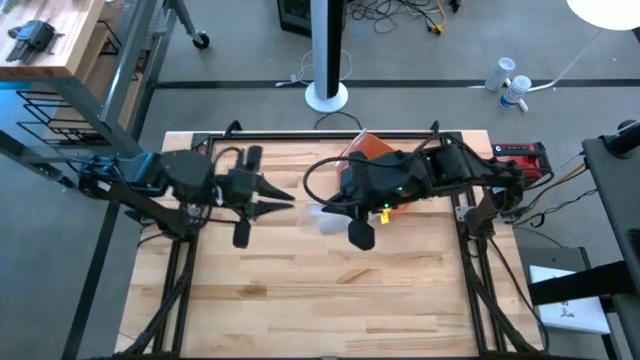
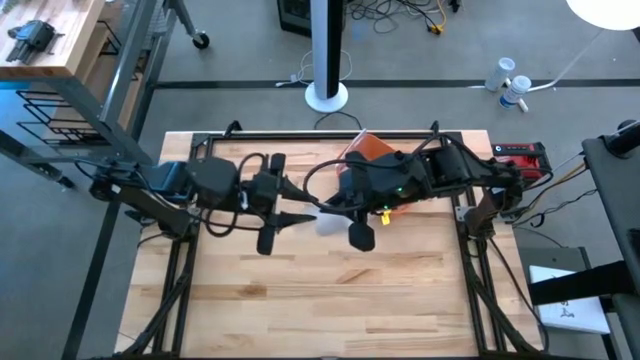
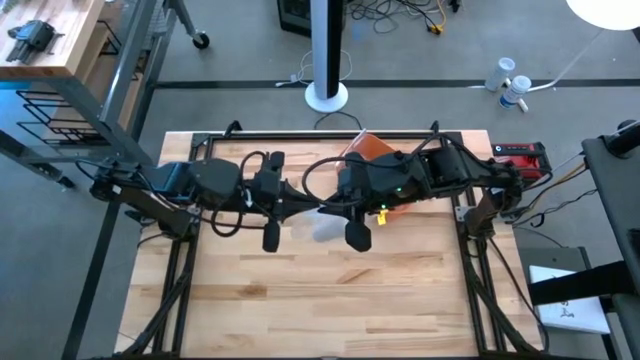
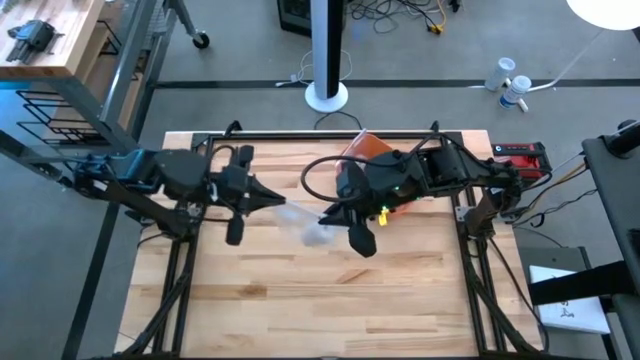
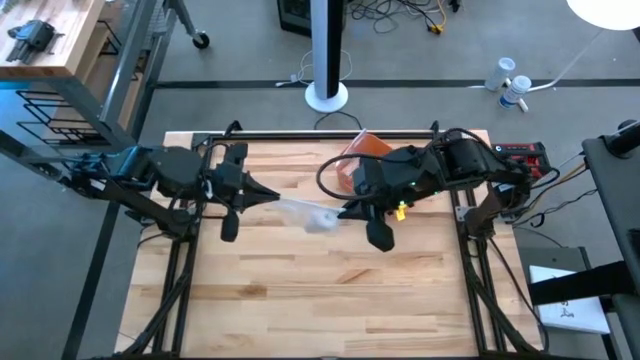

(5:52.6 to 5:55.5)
Task: Roll bandage
Close the transparent zip bag

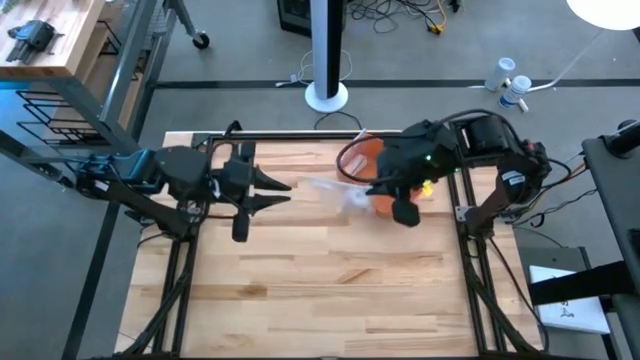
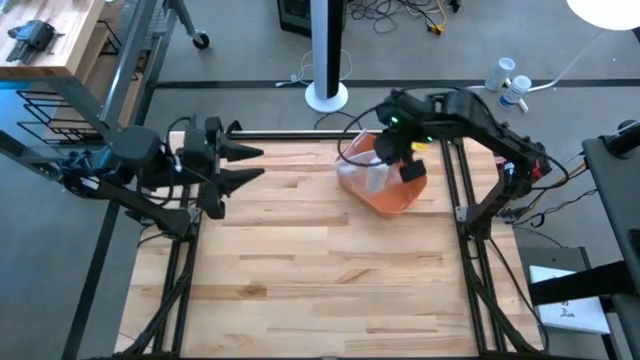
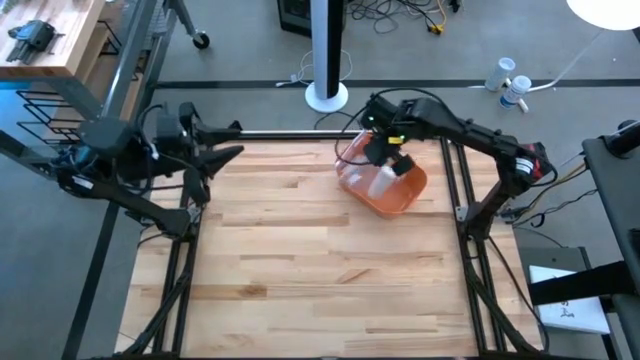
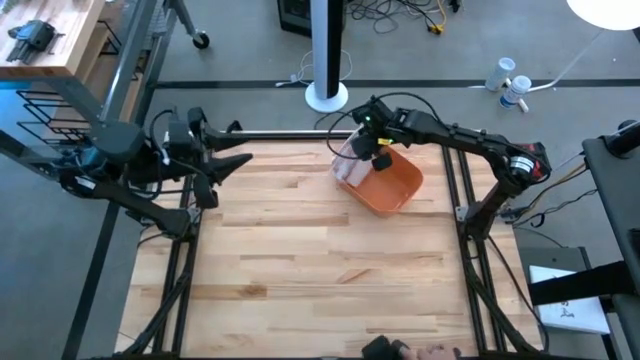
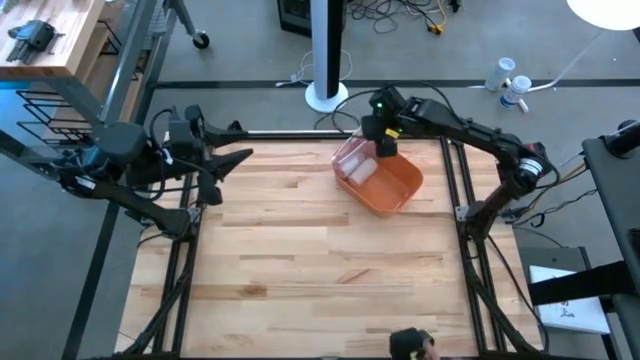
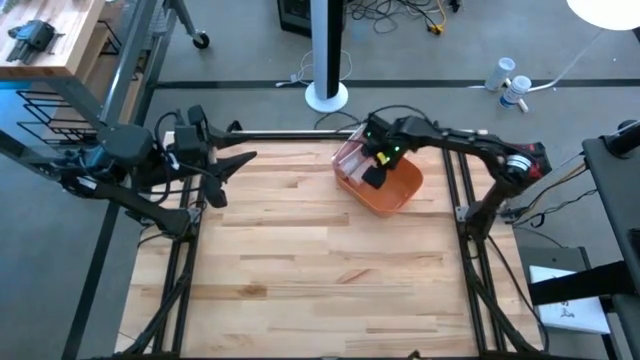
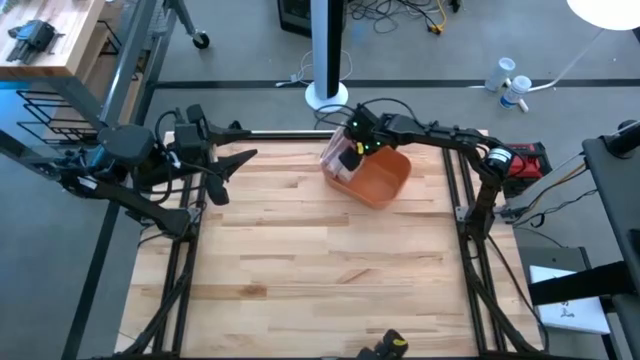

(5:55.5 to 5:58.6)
Put the transparent zip bag into the orange bin

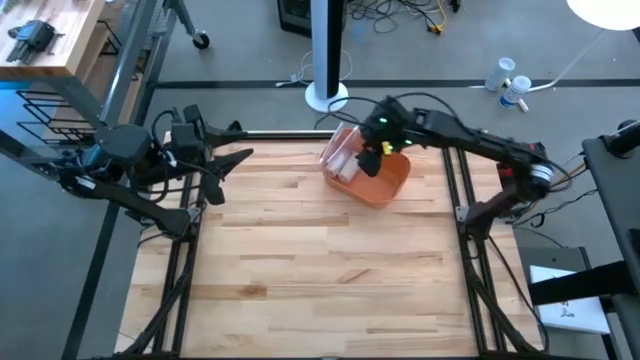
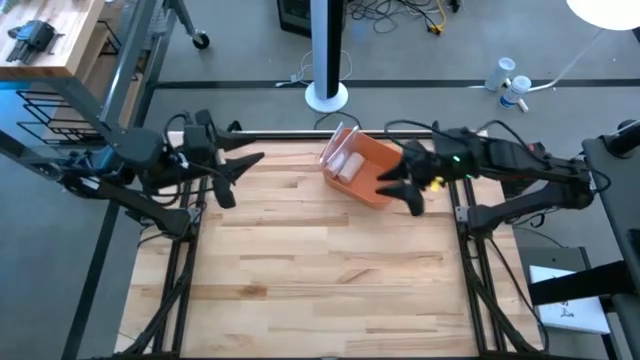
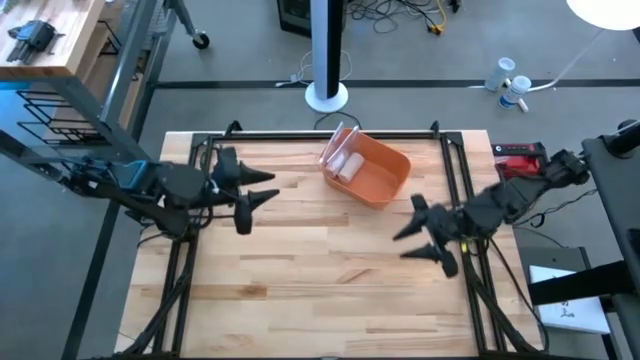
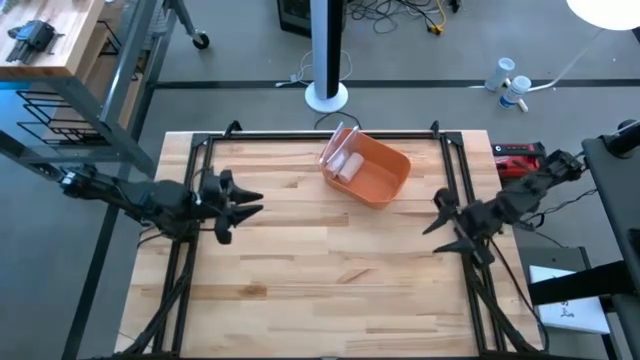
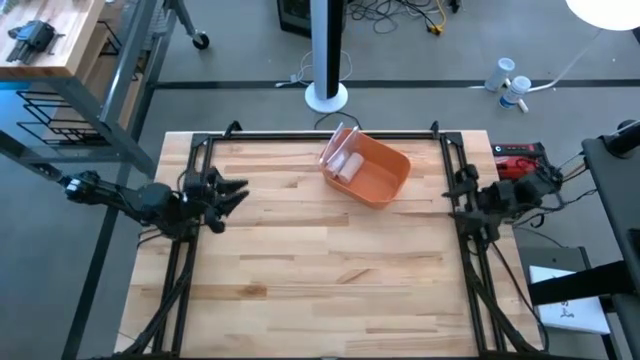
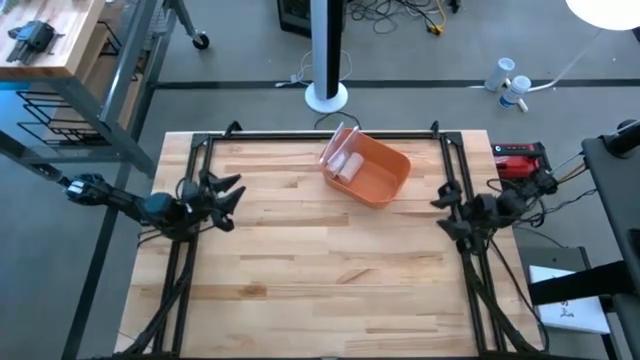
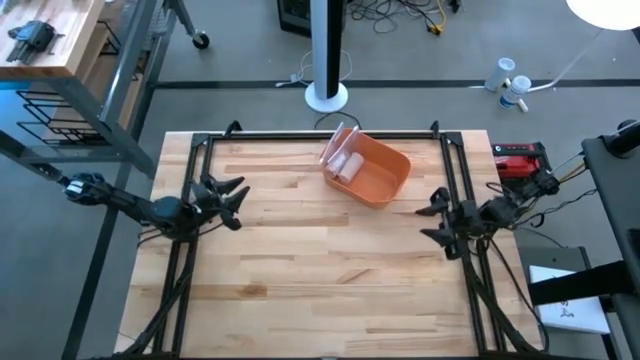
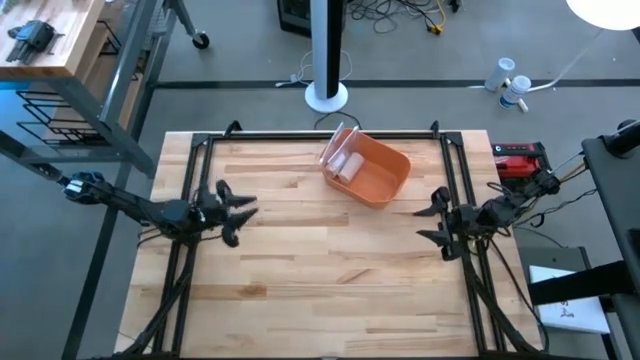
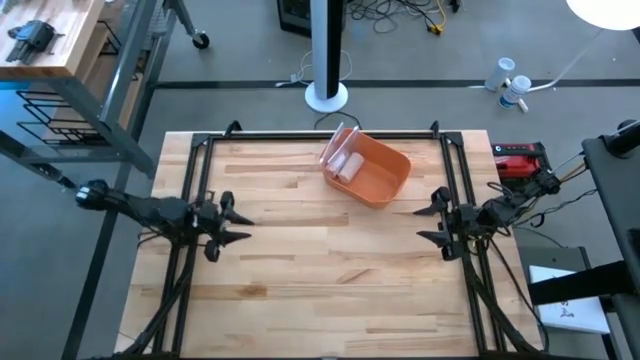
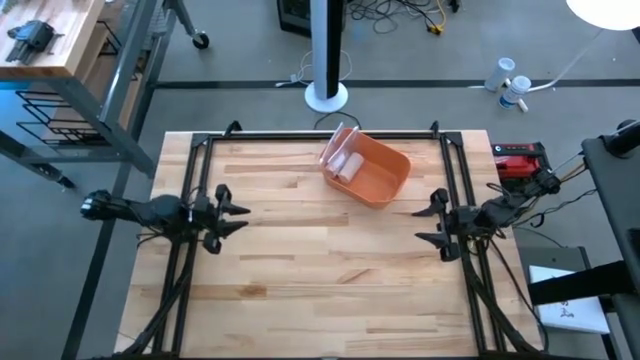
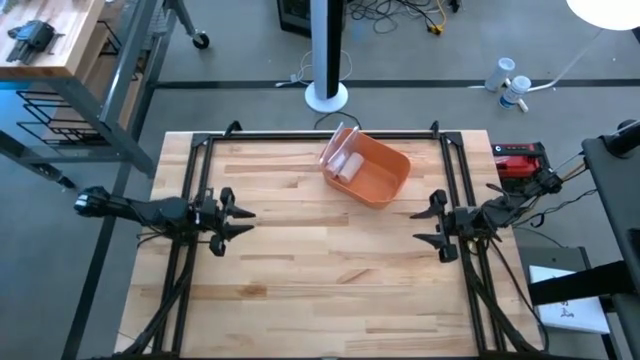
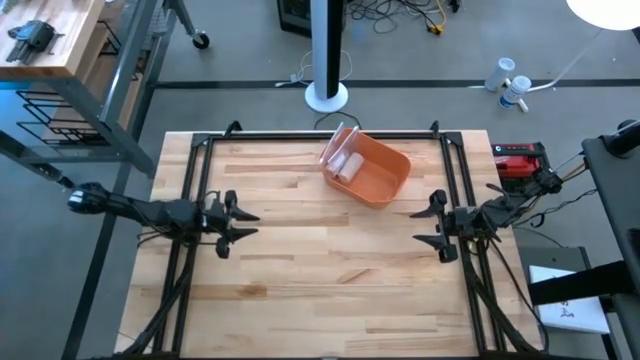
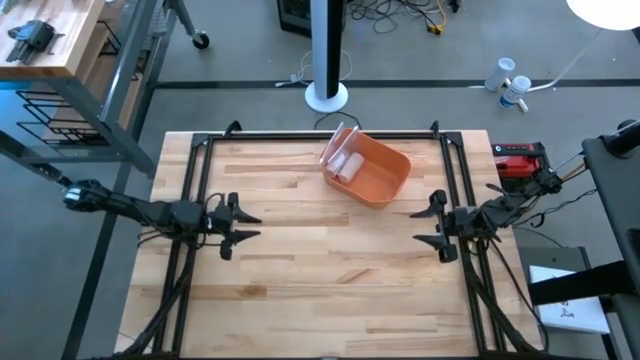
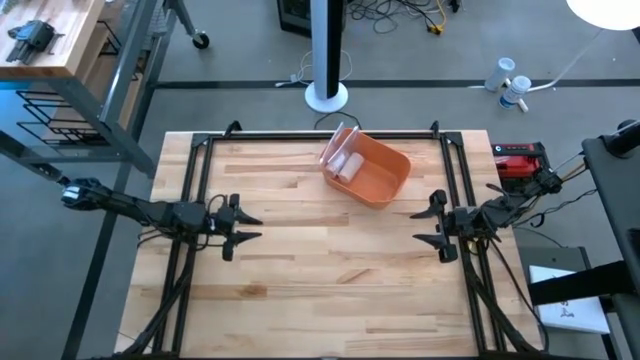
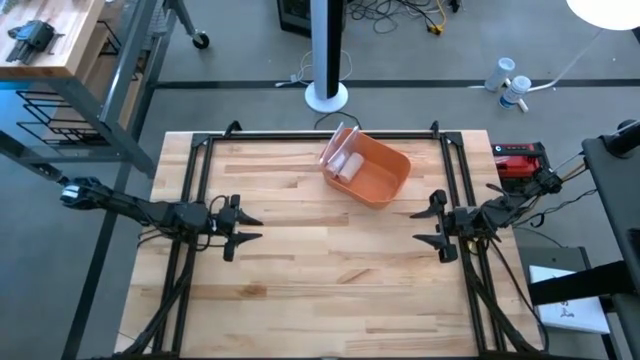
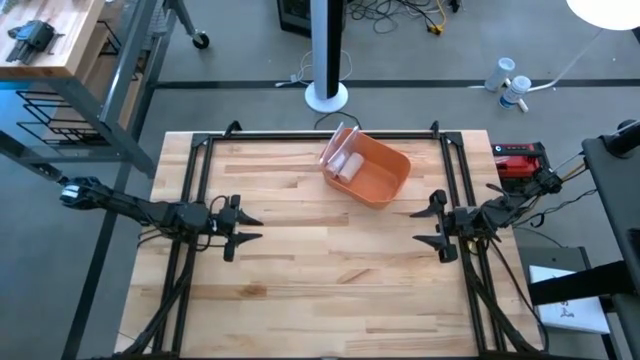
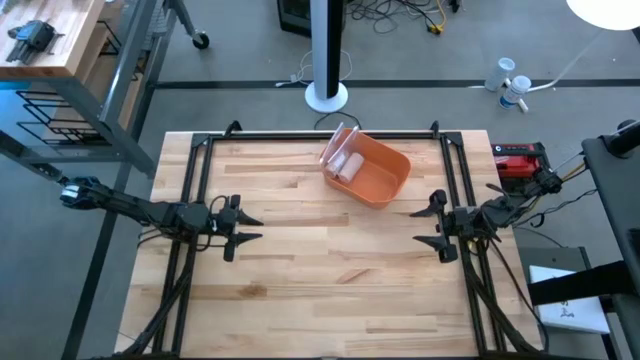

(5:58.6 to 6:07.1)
Return to Home Position

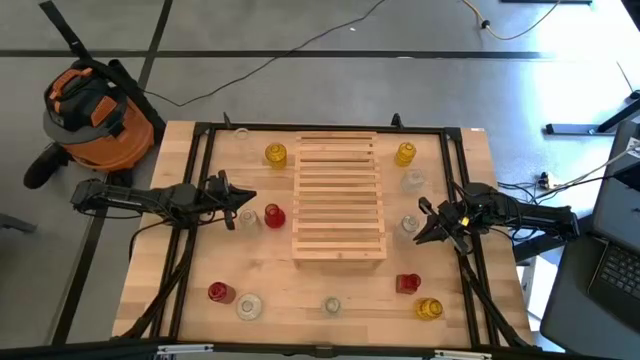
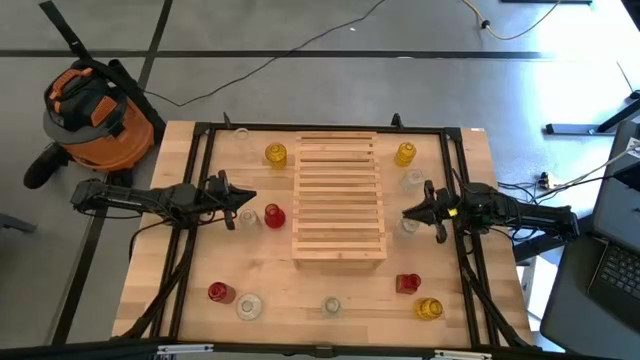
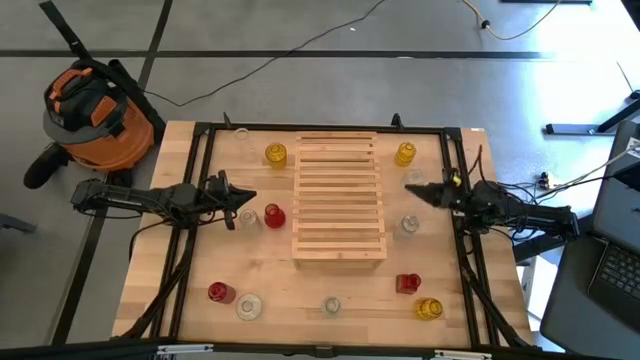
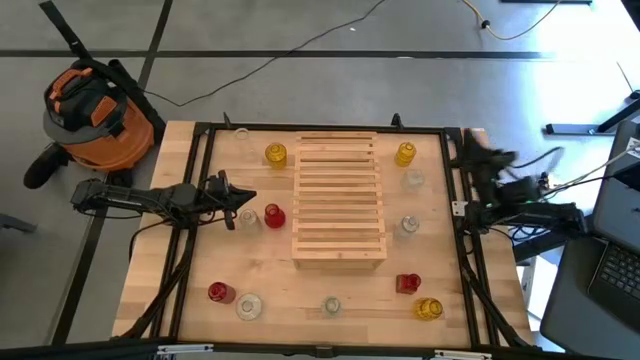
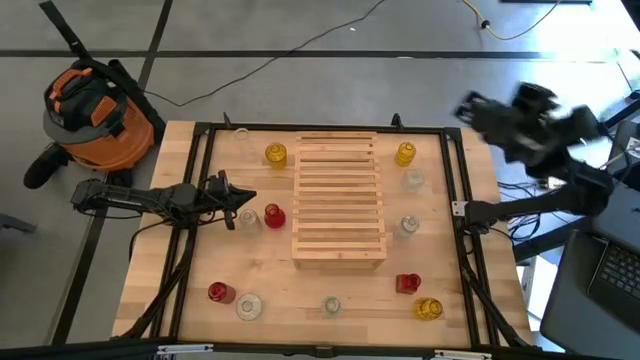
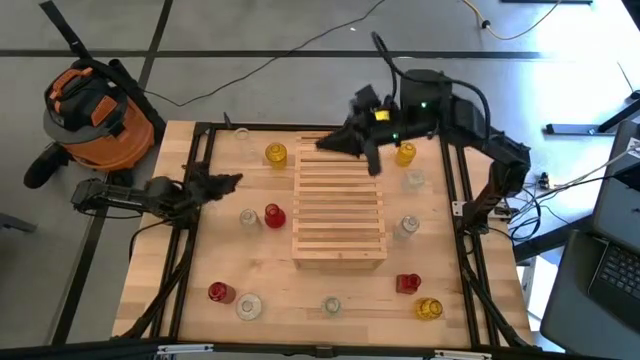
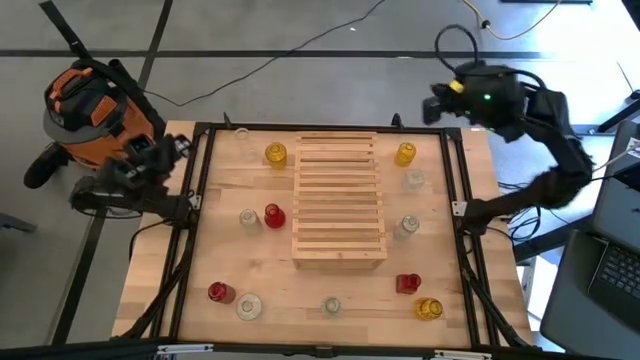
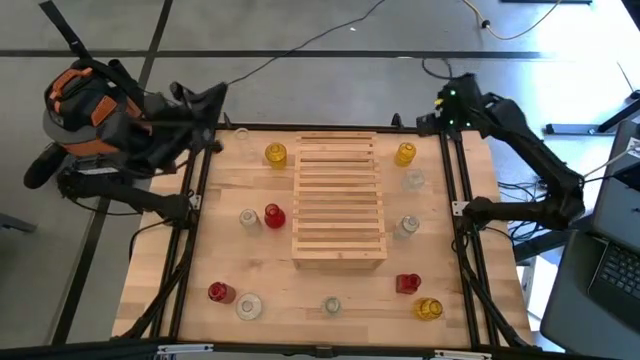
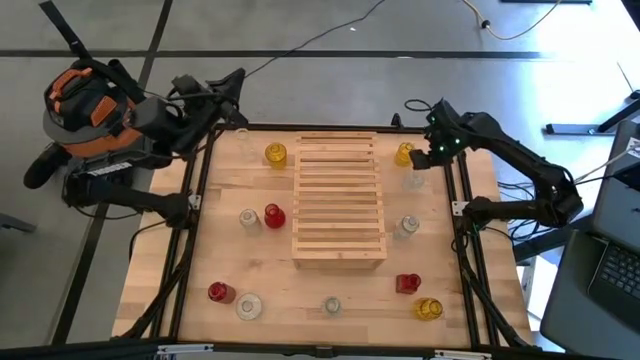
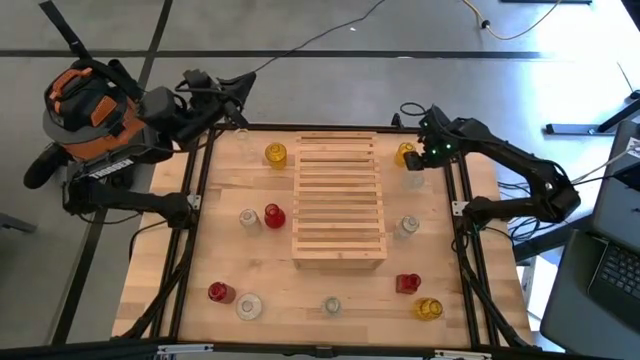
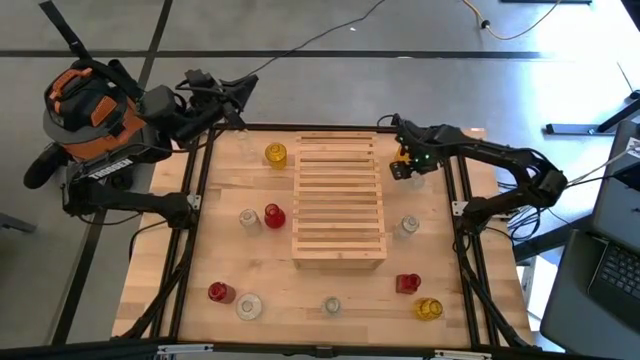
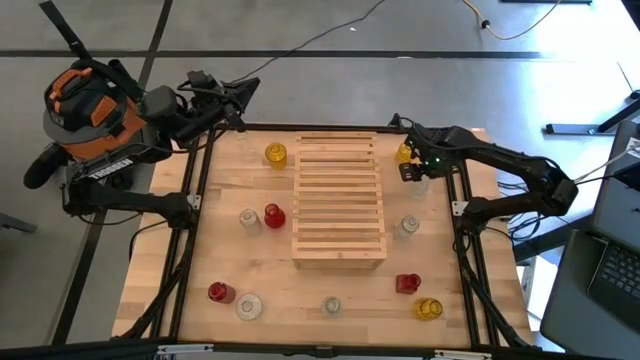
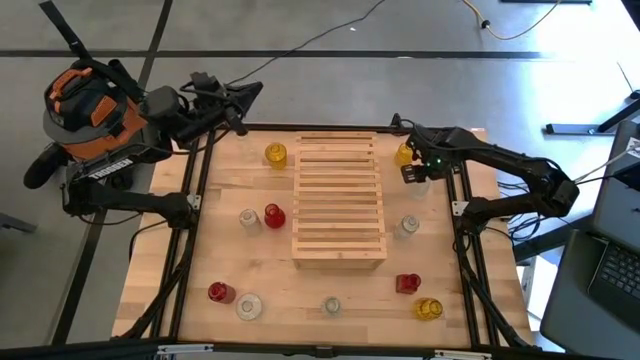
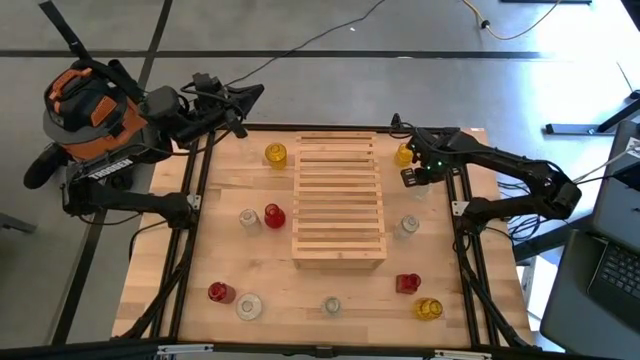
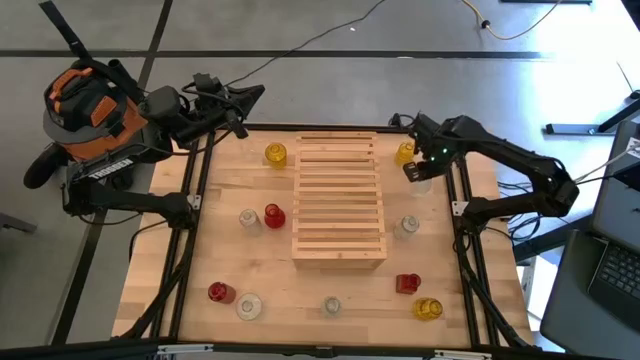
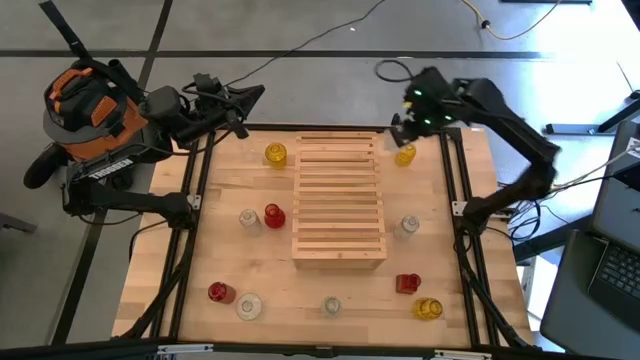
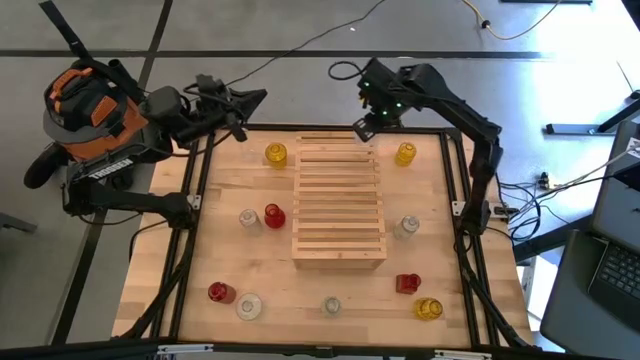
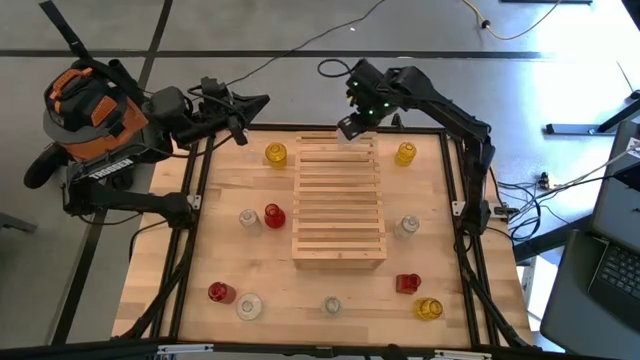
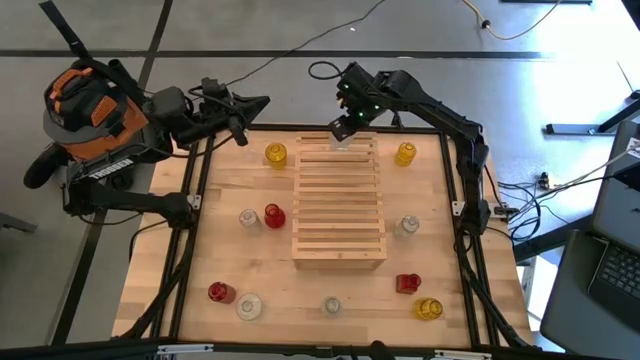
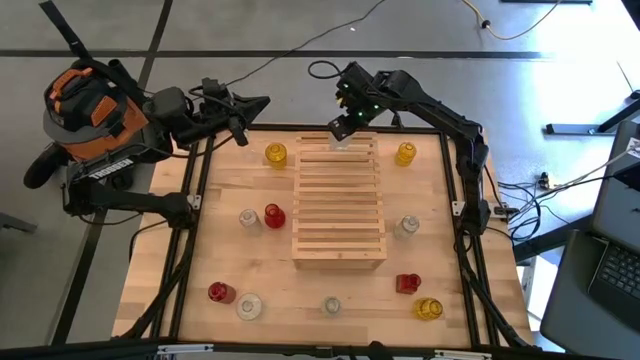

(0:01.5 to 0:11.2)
Task: sort vases onto shelf
Put the transparent vase on the shelf
